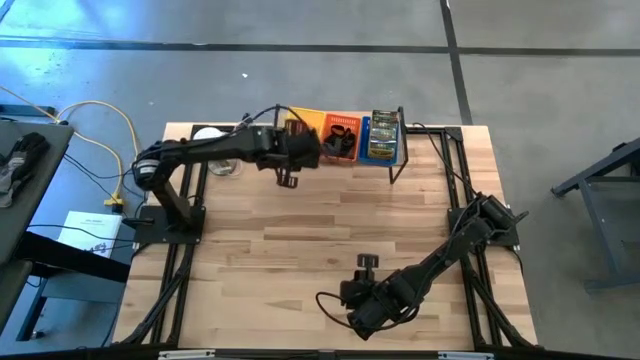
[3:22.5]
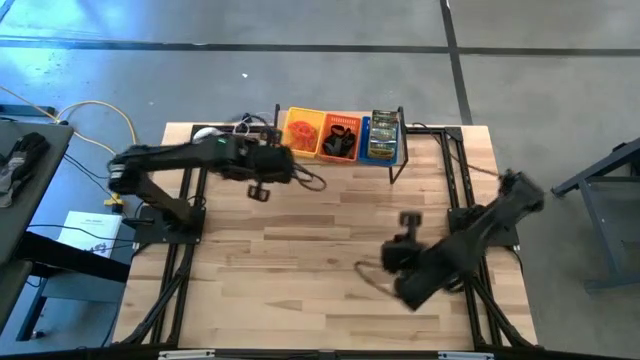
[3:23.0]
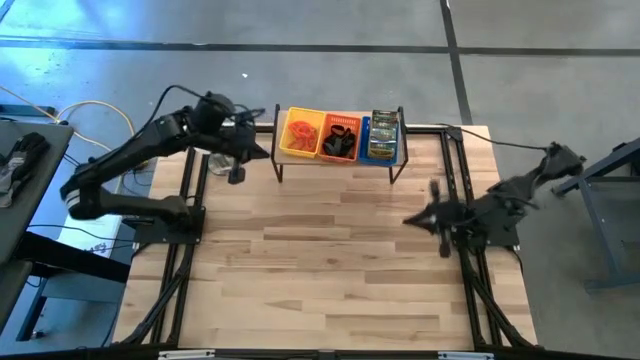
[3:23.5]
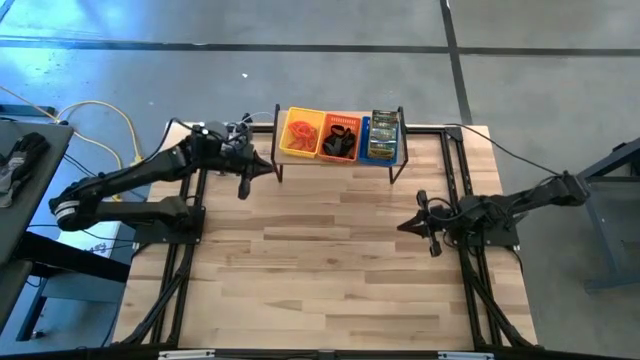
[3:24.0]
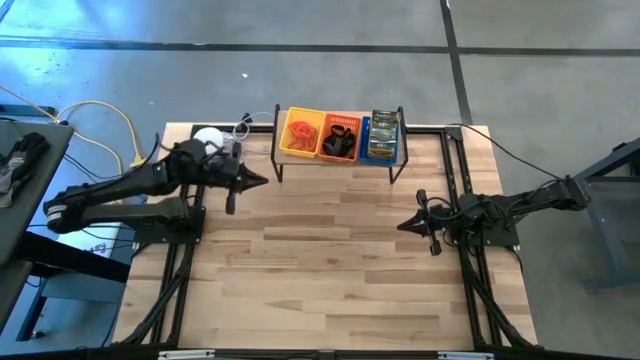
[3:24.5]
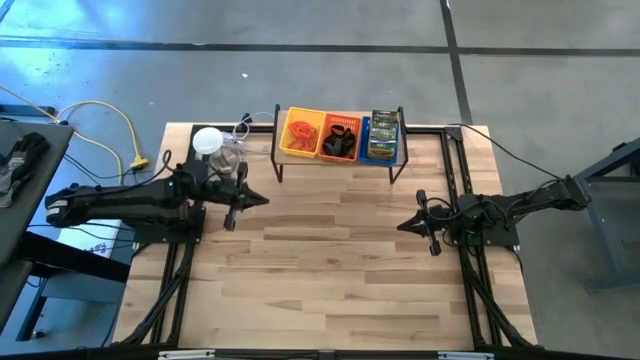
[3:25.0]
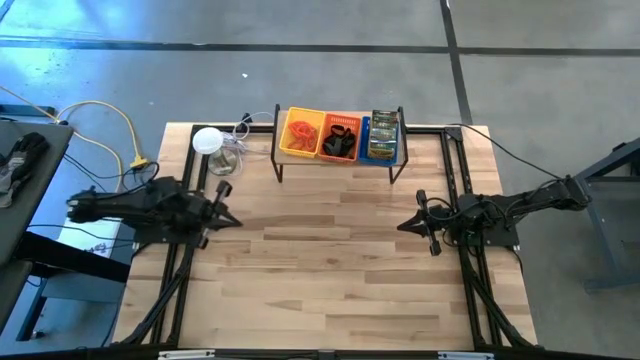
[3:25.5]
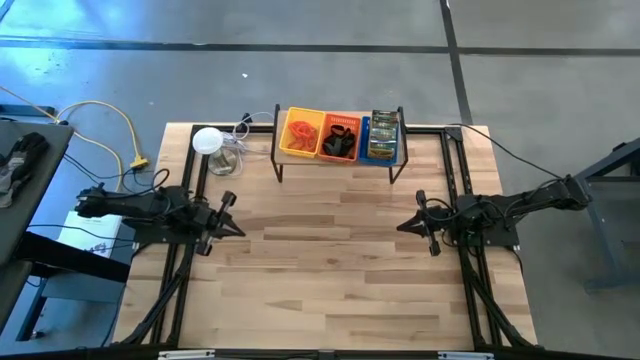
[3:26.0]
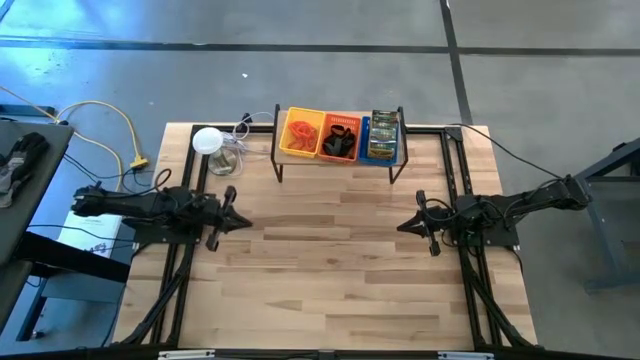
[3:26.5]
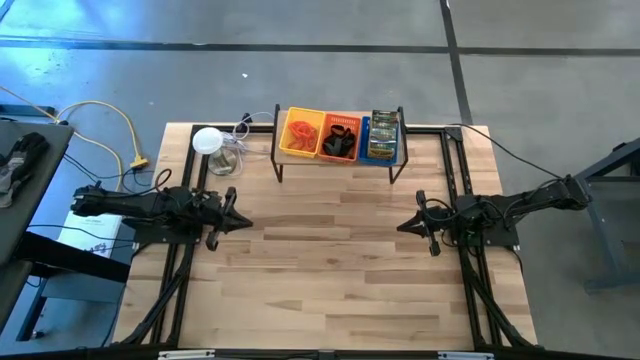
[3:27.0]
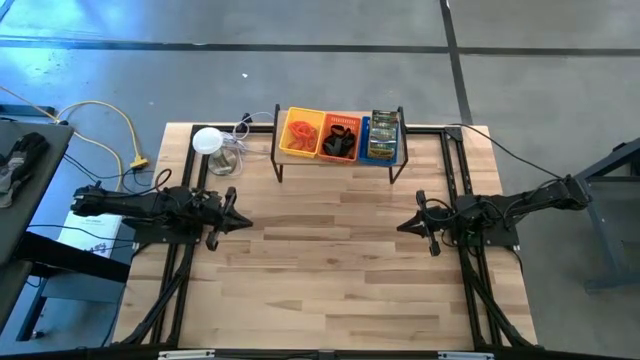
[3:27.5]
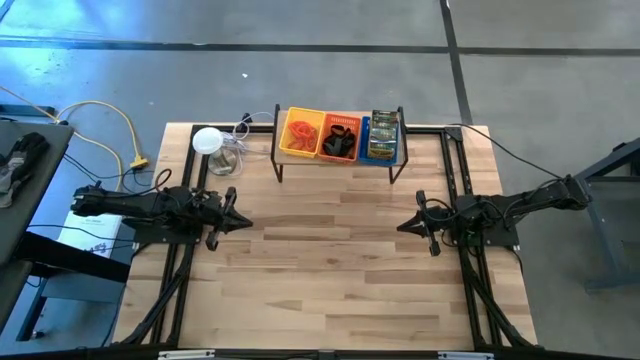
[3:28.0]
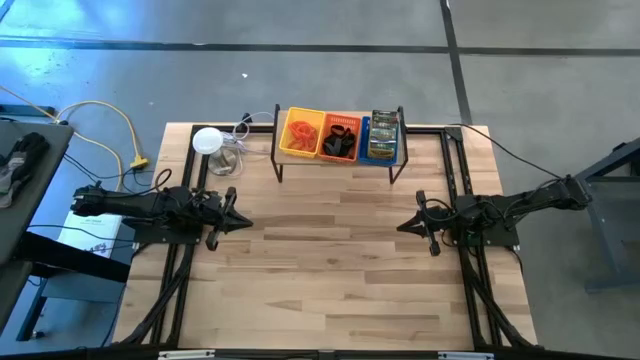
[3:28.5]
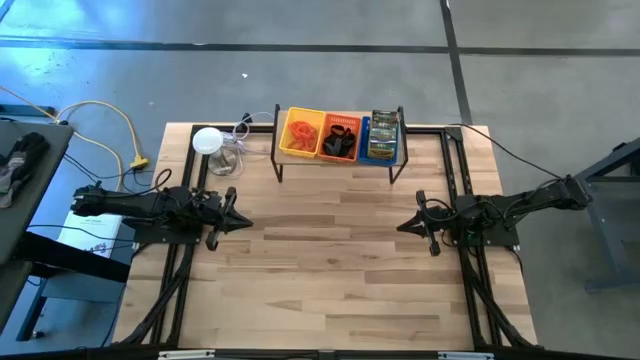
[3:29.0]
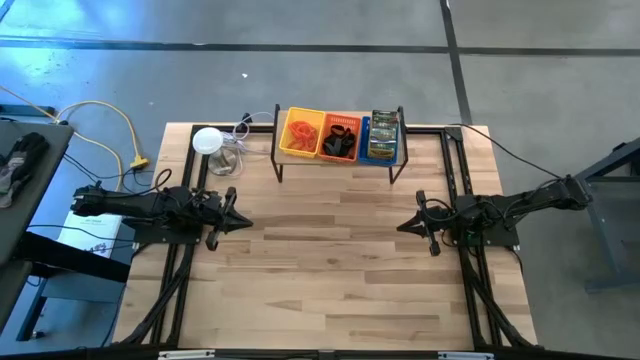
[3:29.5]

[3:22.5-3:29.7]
Task: Pick & Place Office Desk Supplies
Return to Home Position

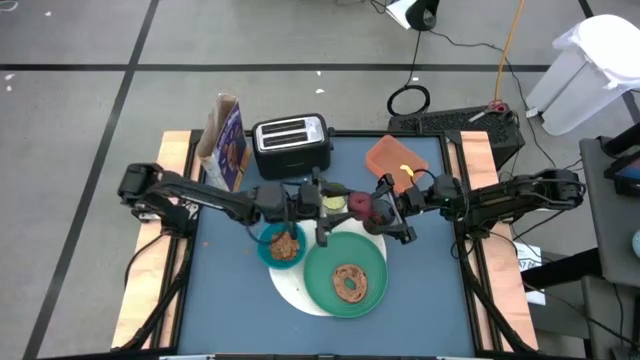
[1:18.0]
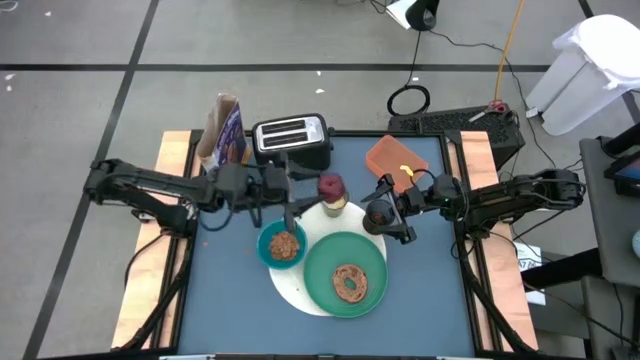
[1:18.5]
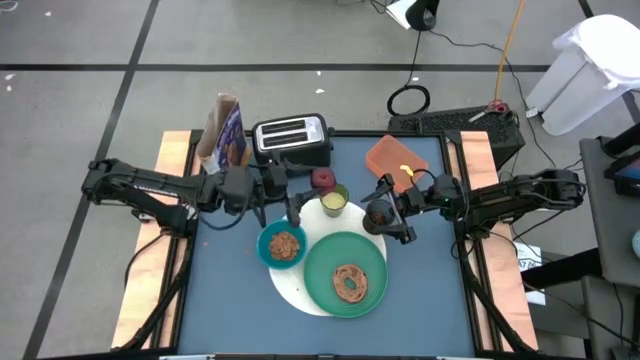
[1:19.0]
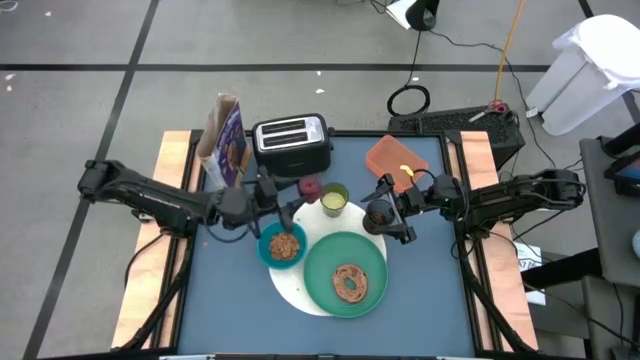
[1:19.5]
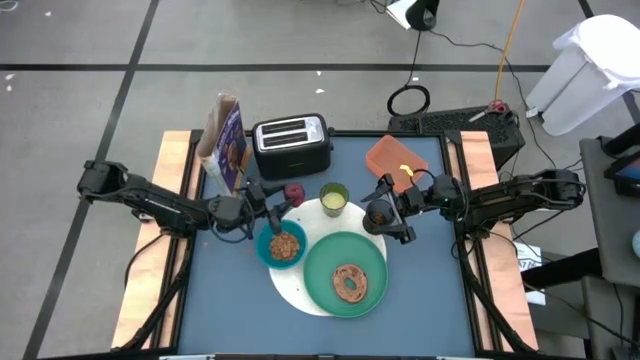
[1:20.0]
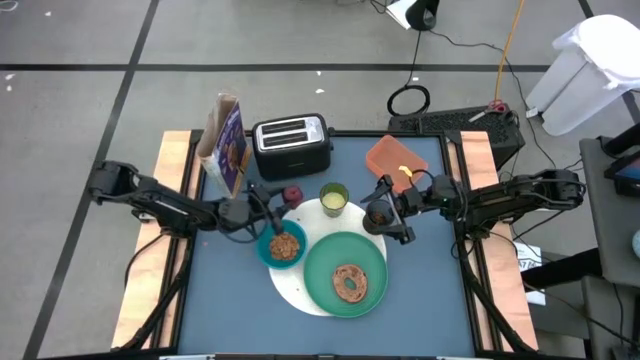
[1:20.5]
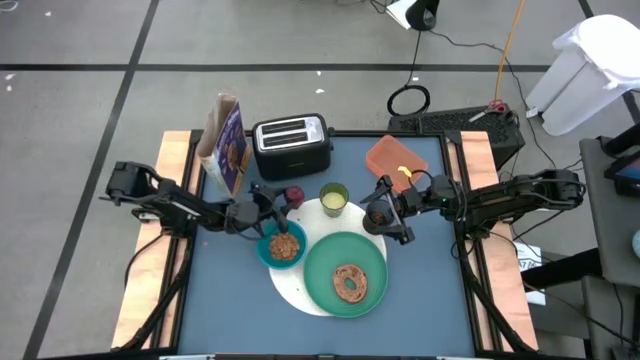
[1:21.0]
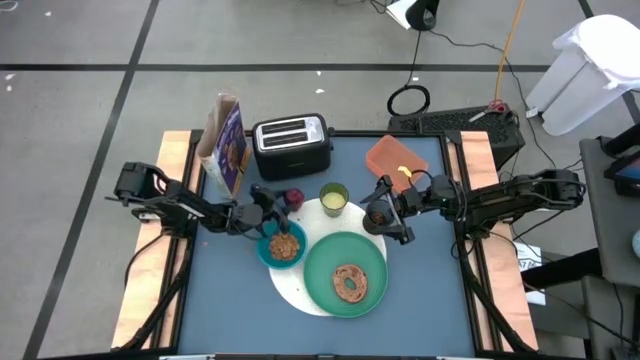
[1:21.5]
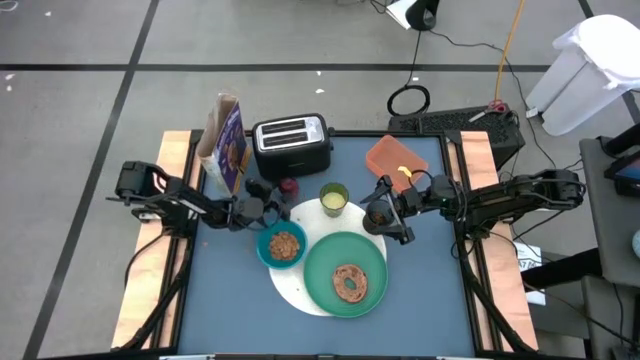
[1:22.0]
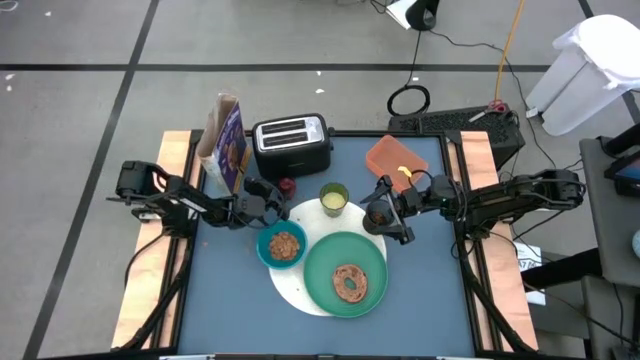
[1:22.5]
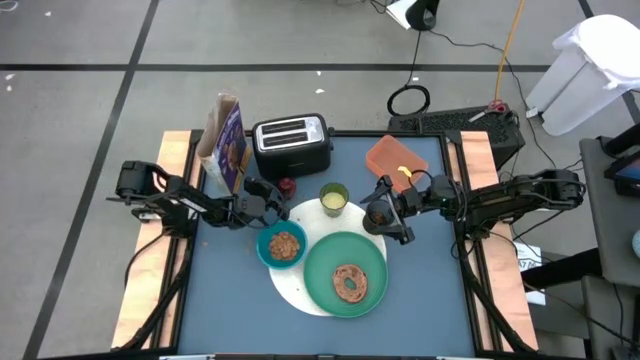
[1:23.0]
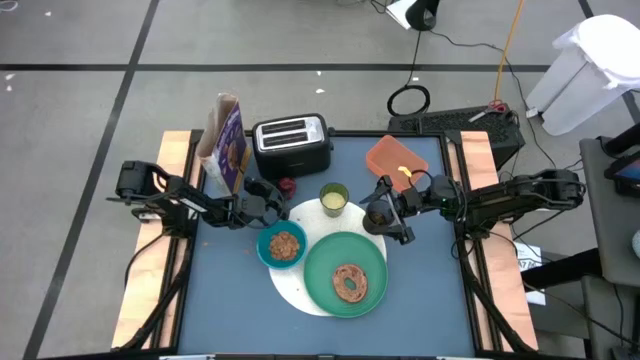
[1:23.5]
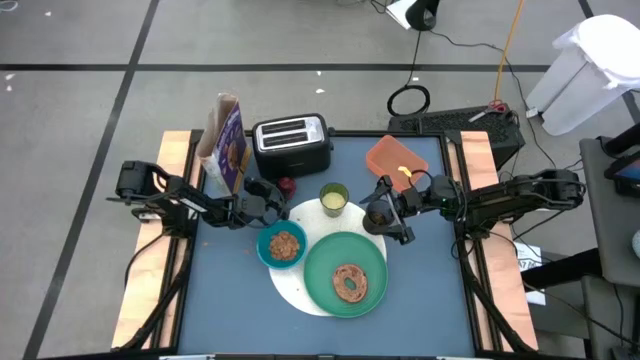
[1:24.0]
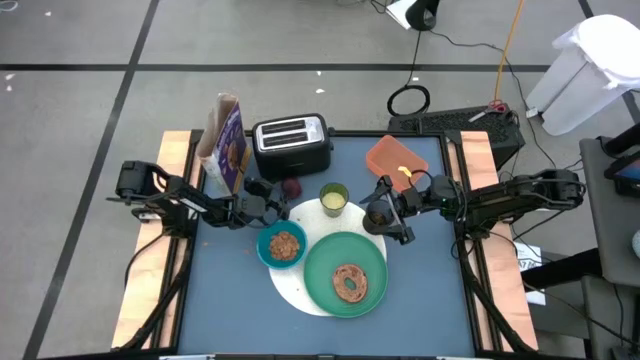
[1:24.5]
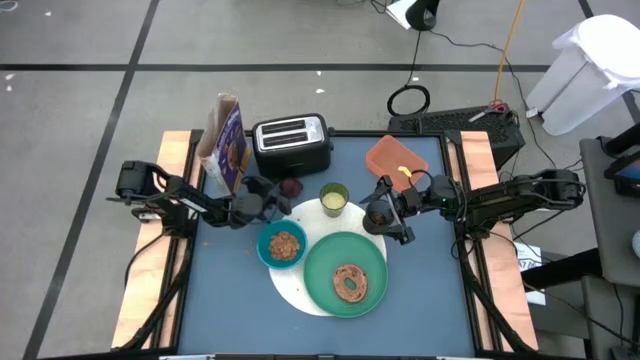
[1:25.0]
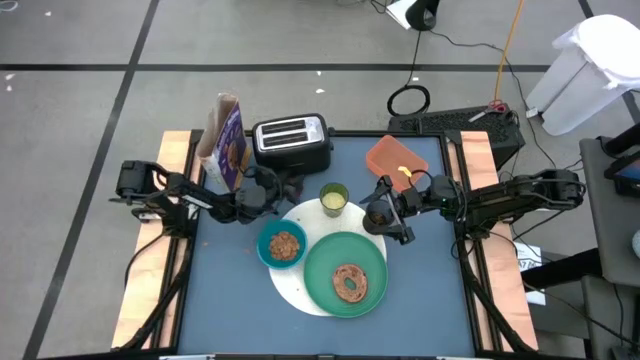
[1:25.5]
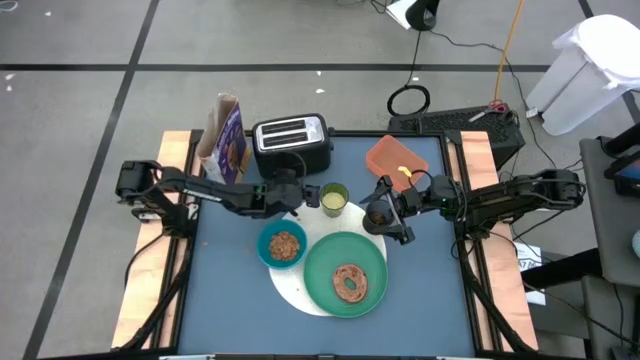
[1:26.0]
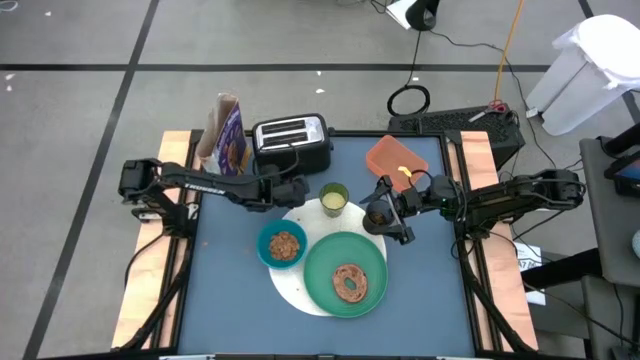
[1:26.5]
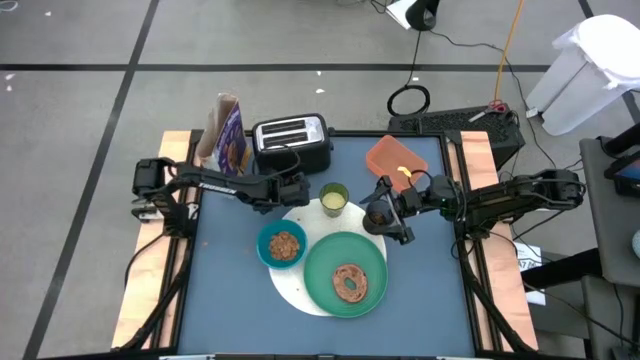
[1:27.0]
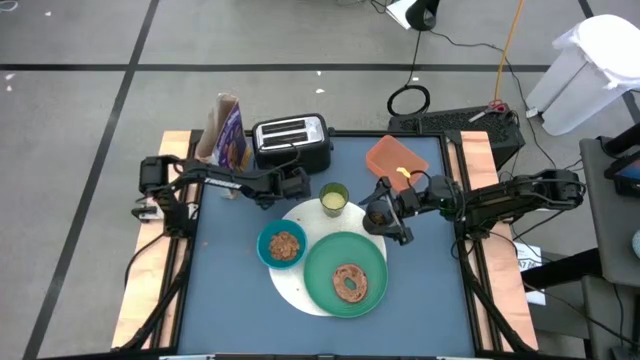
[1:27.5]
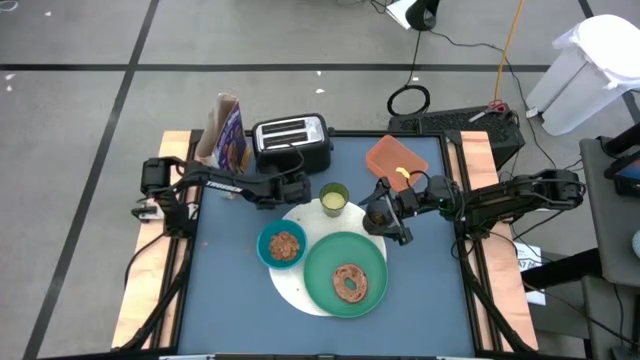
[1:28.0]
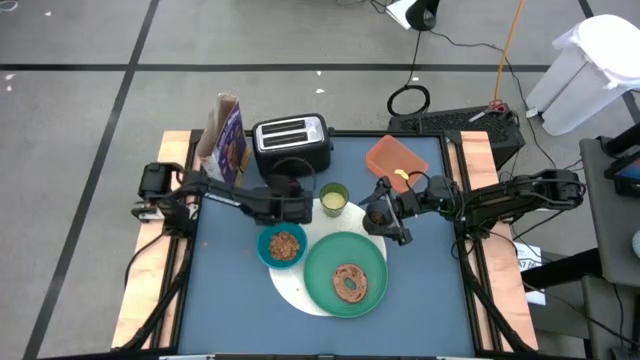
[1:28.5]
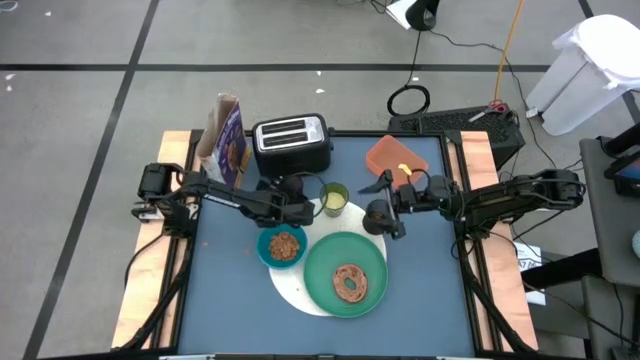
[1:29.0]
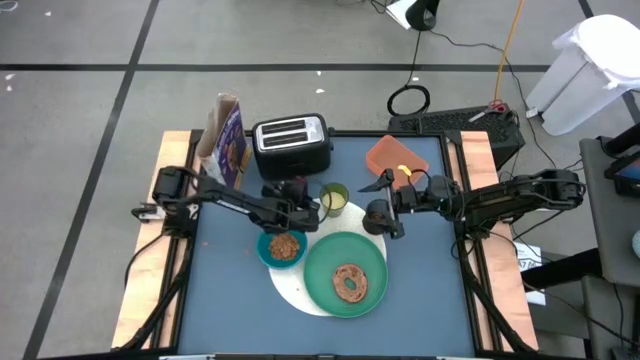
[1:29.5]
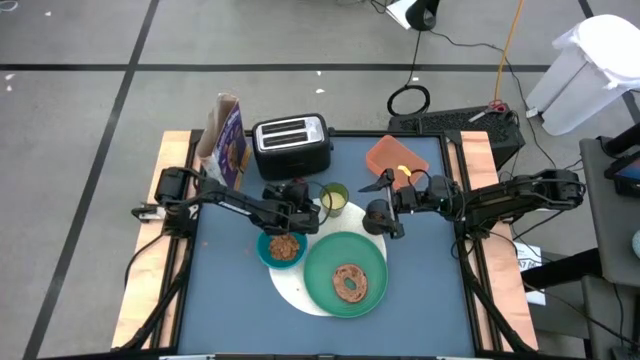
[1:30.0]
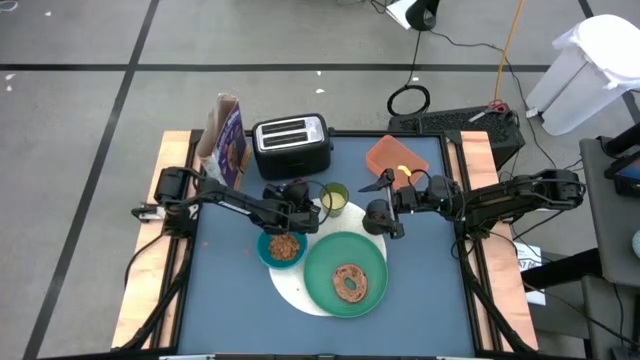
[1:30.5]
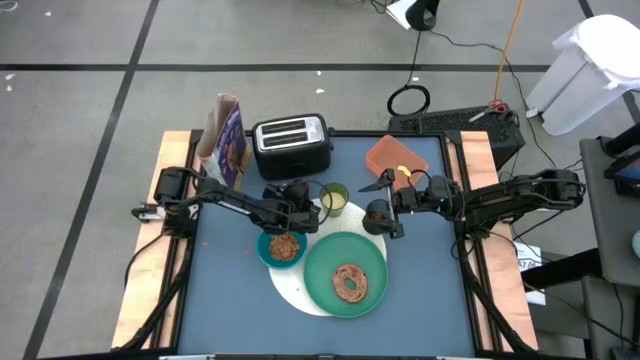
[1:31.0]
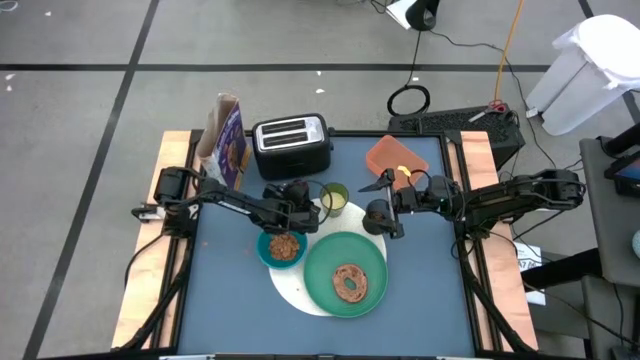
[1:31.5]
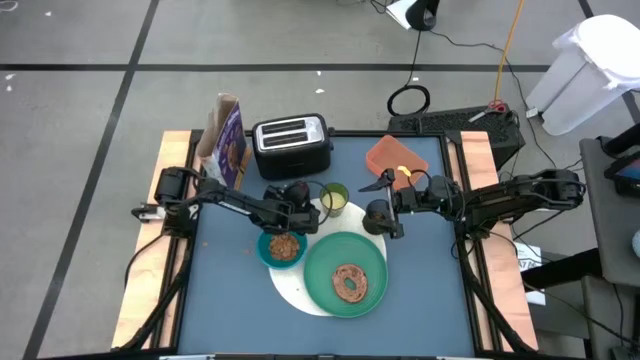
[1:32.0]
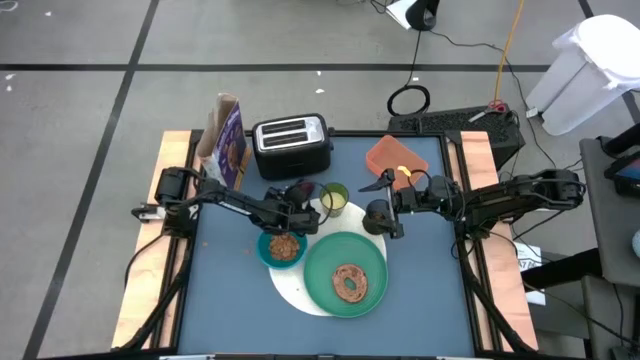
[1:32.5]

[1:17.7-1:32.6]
Task: Arrange a breakfast setting
Put the red apple on the white mat
